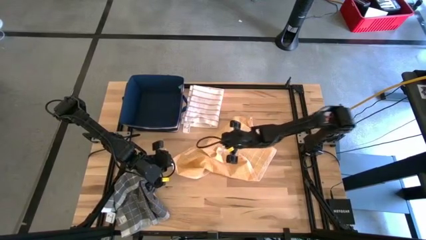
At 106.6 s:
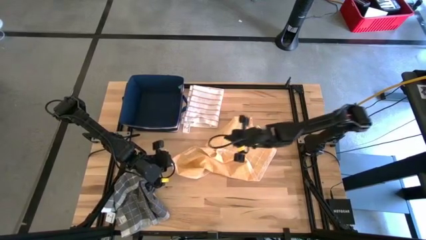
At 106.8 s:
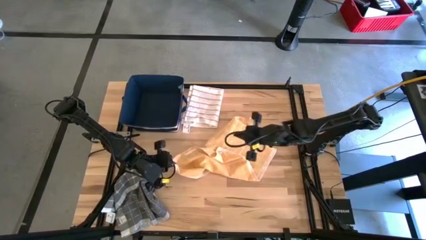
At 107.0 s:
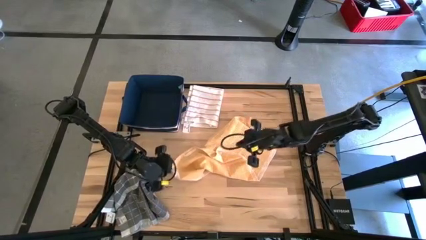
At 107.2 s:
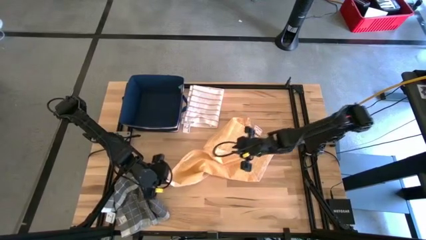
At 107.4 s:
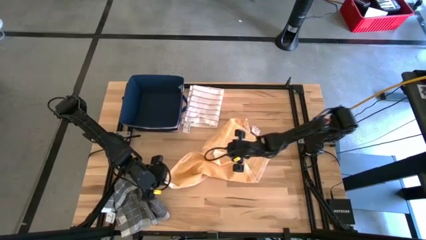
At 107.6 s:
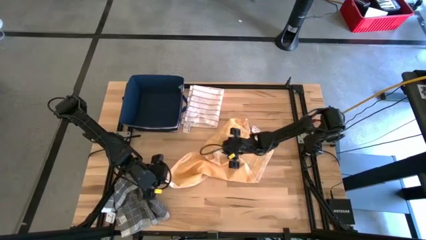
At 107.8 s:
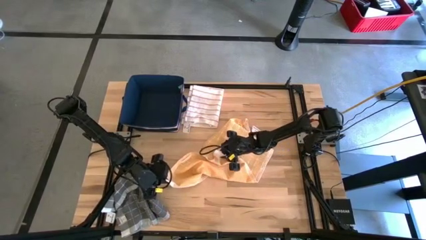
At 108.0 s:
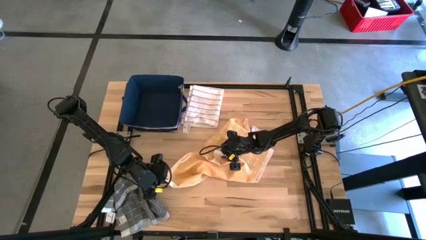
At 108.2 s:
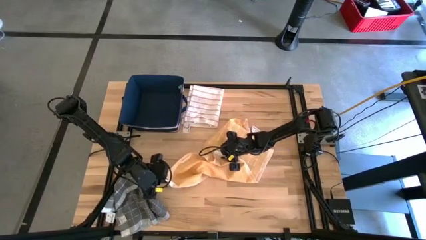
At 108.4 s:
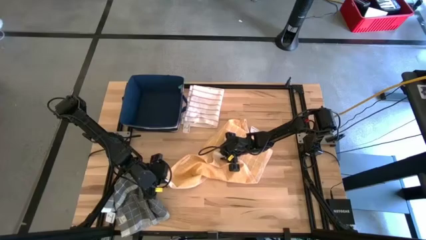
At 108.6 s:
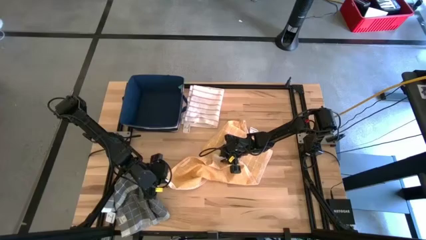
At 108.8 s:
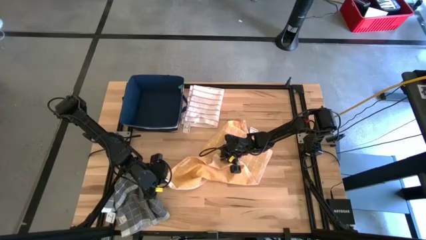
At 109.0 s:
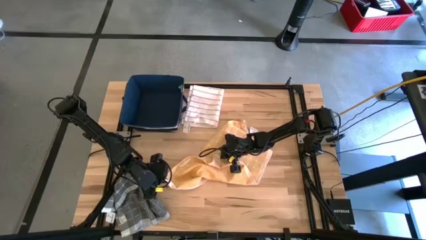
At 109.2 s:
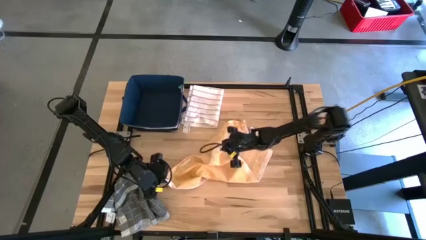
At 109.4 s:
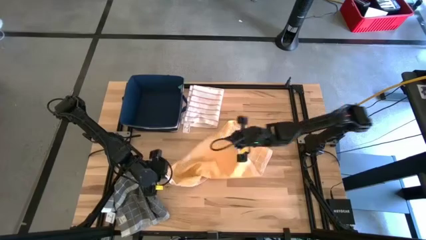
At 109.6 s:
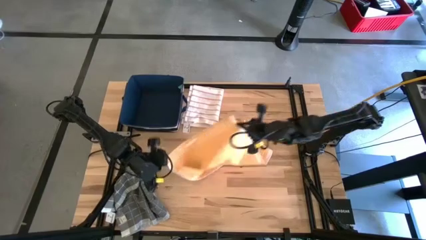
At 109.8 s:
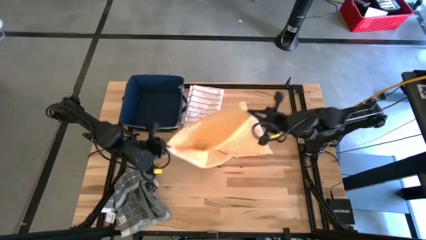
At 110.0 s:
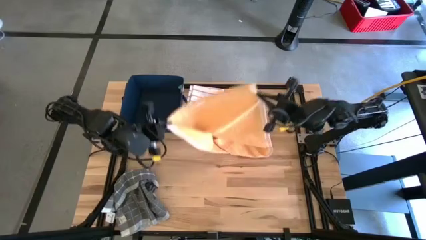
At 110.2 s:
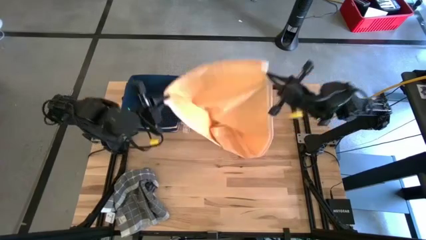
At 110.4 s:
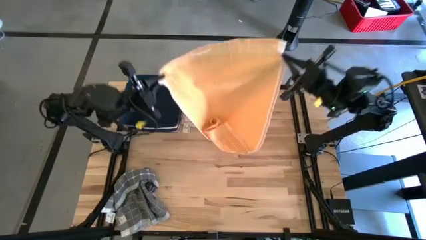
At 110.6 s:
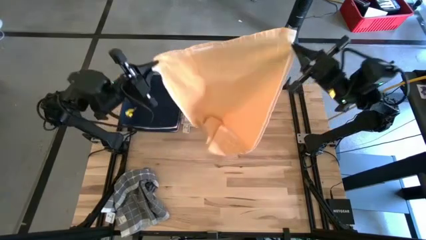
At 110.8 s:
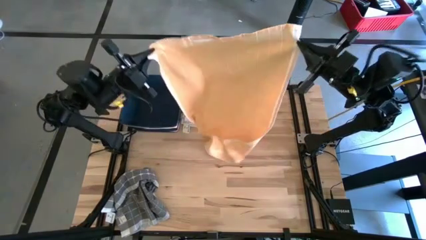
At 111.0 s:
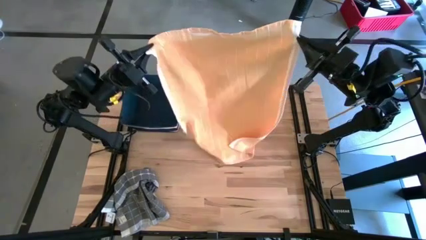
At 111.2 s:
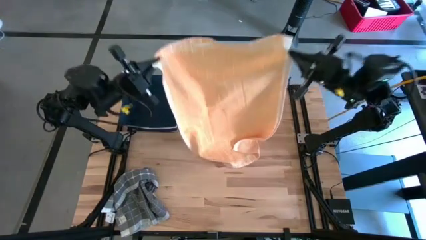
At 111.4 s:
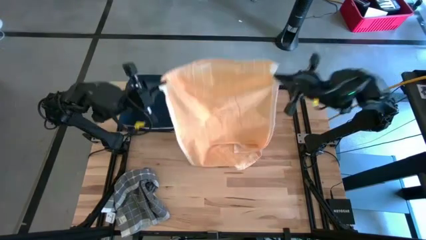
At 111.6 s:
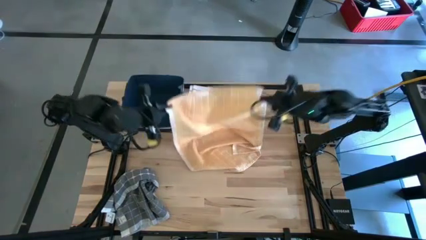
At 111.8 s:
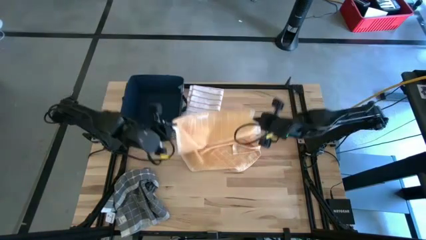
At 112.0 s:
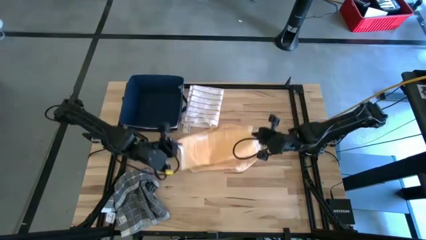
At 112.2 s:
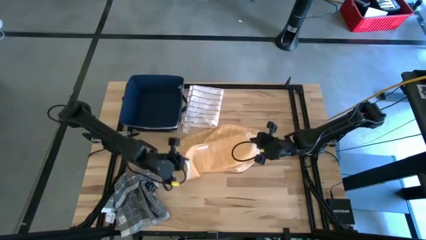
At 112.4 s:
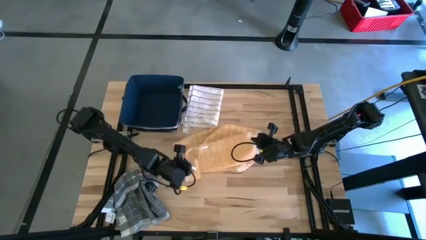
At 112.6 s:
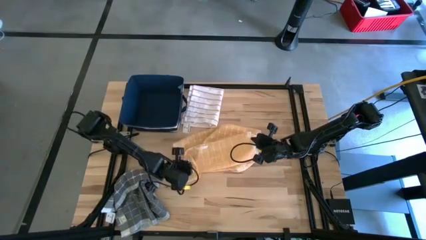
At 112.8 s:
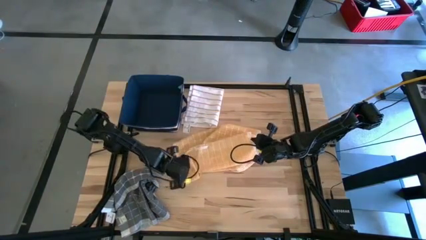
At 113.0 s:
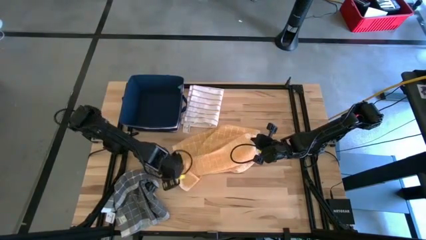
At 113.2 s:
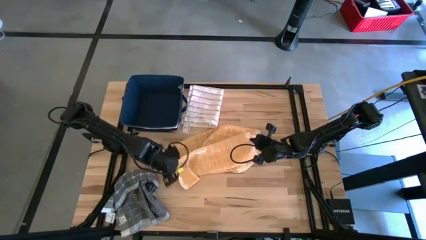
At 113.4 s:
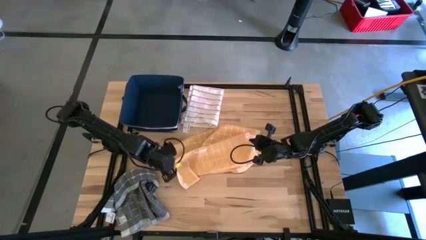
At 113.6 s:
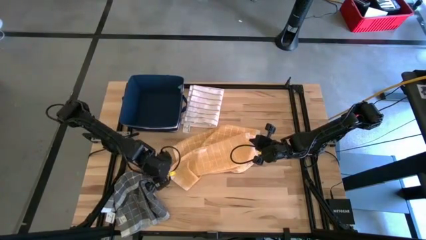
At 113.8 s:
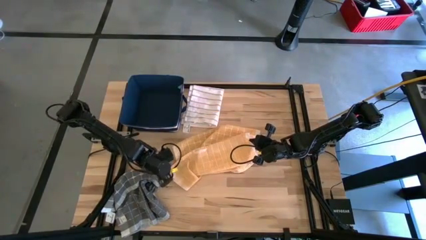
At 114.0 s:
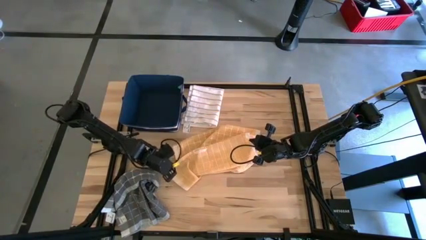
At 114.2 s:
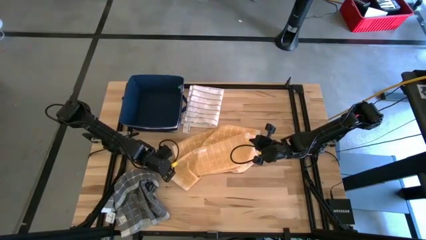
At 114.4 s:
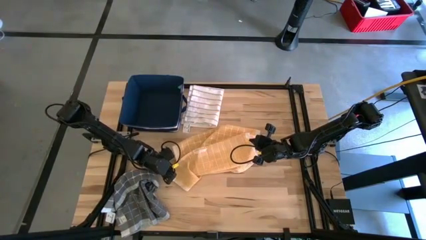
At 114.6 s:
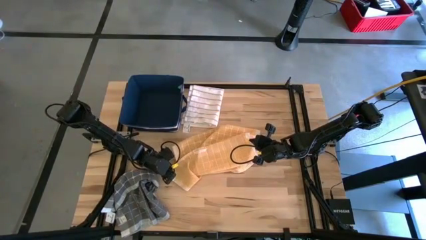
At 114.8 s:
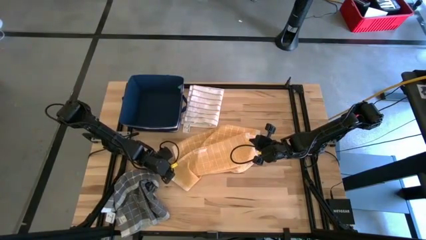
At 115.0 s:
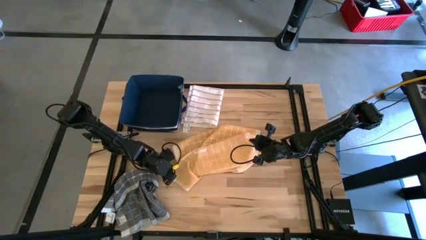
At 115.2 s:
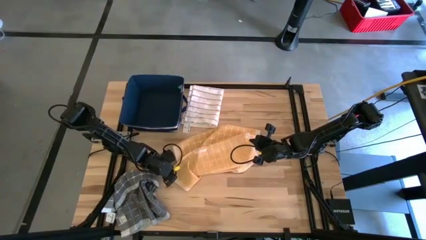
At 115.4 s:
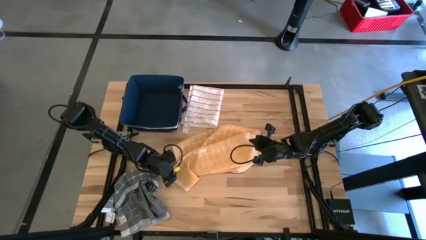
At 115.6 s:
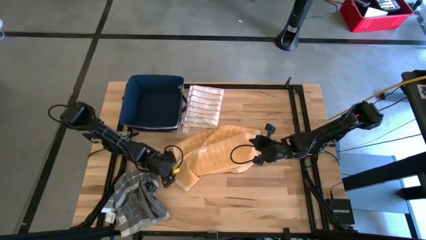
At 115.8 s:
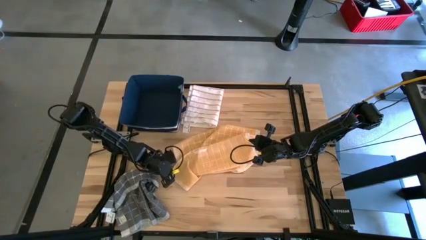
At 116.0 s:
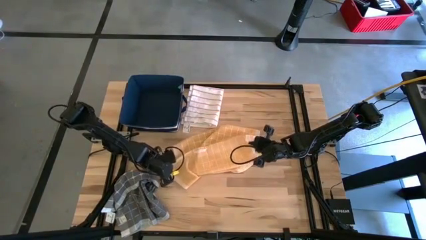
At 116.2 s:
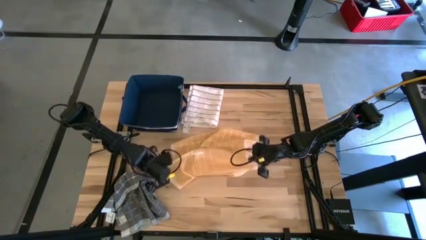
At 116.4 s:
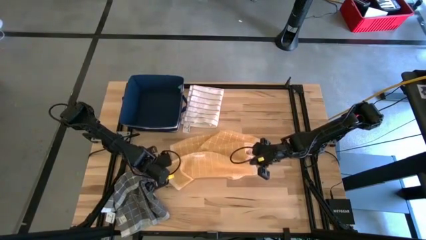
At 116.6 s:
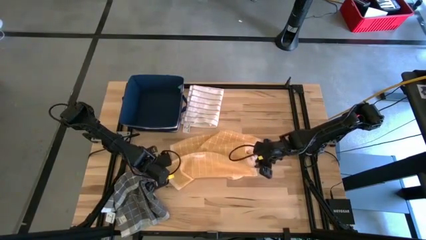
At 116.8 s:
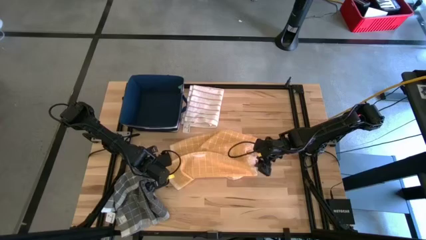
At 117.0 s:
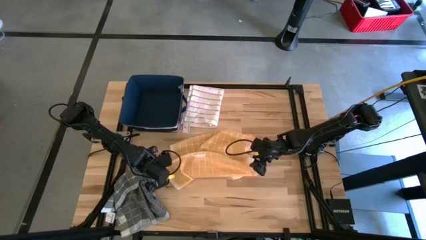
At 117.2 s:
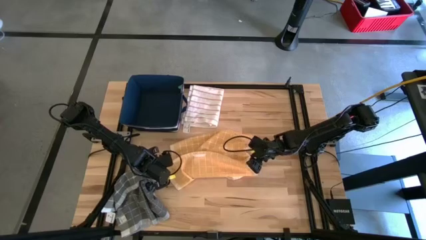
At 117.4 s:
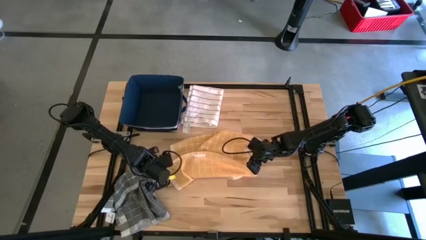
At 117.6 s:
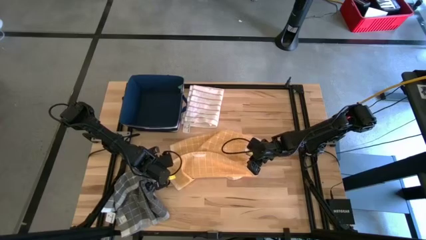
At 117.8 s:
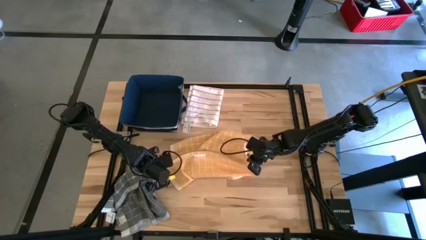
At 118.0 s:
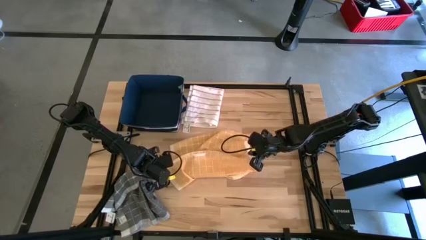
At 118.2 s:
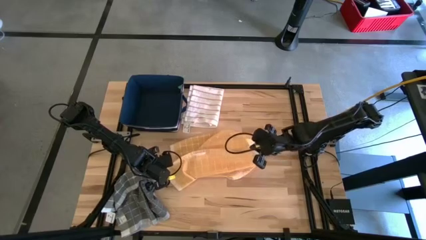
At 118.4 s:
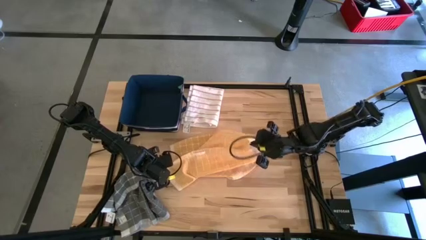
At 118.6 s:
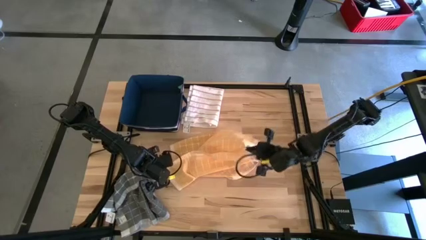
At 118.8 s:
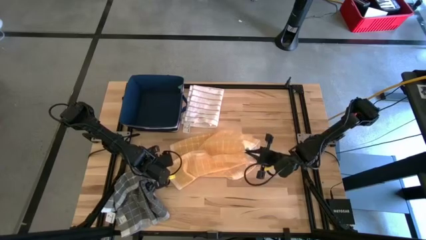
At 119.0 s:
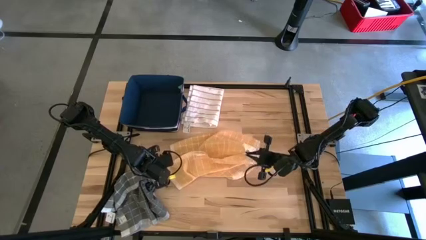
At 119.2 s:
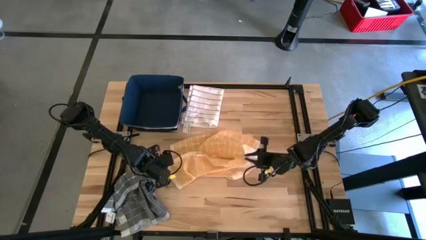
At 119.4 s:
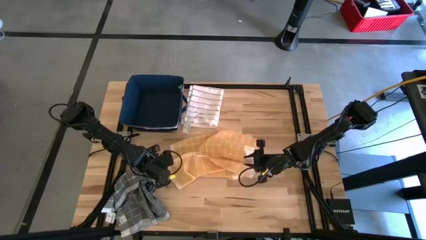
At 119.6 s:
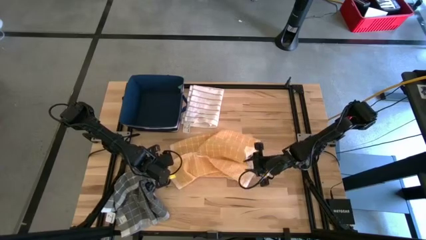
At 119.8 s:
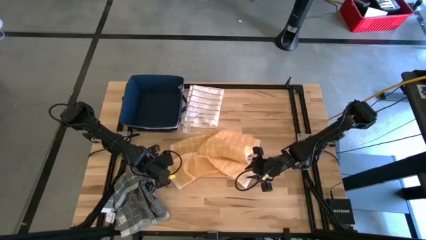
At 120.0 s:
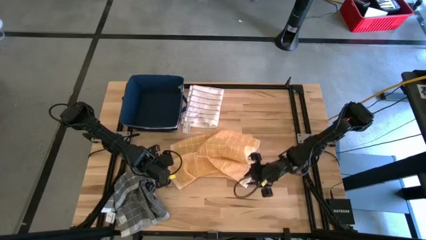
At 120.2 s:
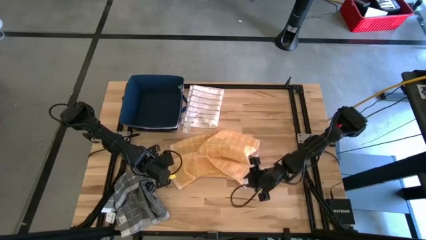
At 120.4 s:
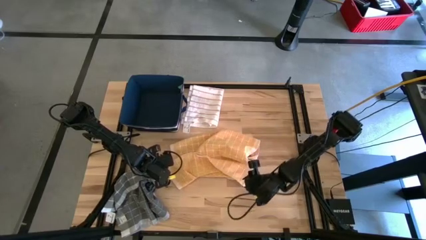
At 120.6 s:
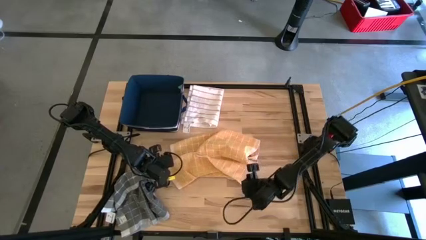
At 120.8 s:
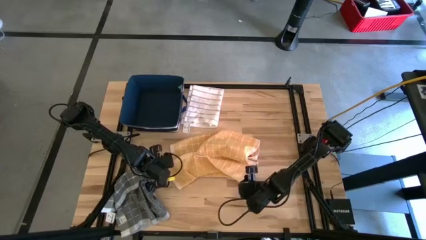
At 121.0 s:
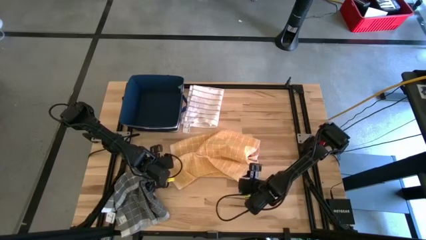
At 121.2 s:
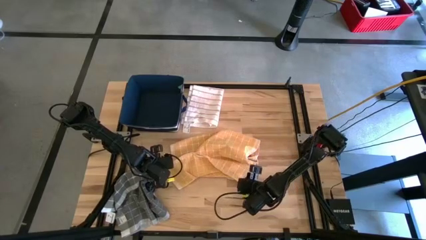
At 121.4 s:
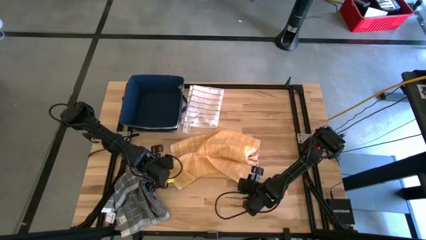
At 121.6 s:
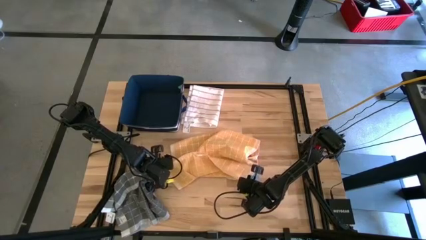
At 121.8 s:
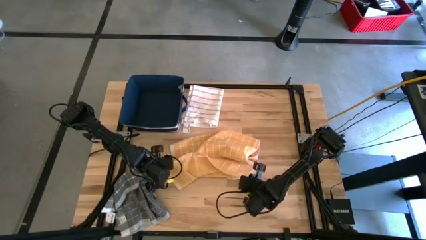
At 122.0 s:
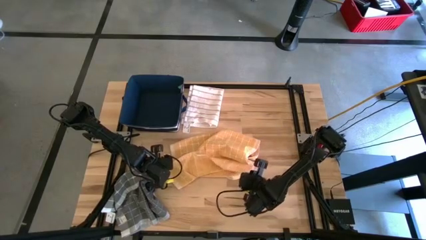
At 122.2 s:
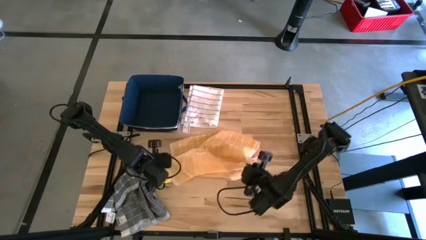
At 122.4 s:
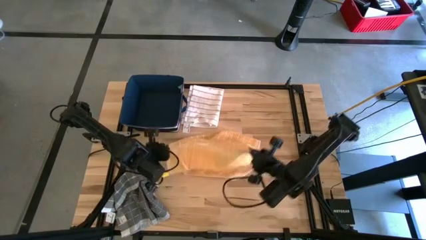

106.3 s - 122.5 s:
Task: Fold towel
Fold the orange towel

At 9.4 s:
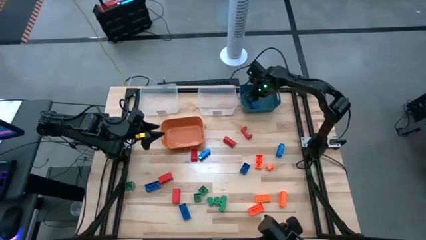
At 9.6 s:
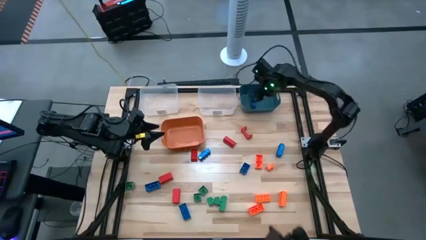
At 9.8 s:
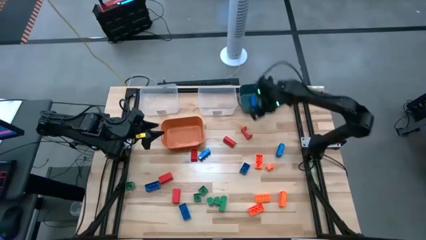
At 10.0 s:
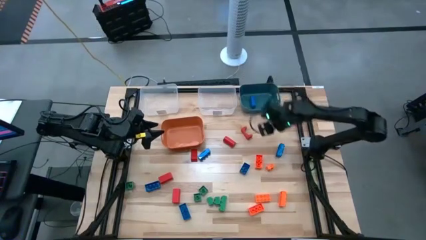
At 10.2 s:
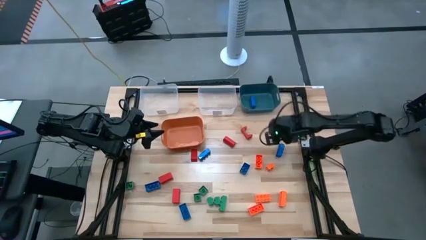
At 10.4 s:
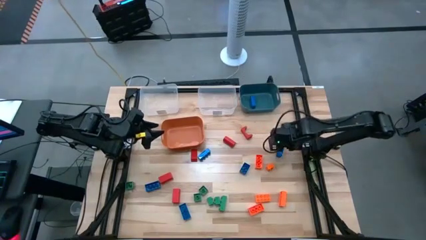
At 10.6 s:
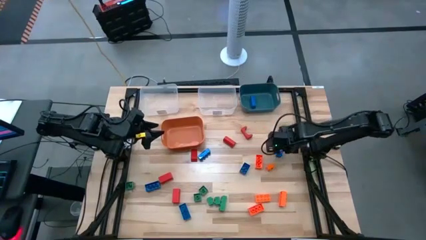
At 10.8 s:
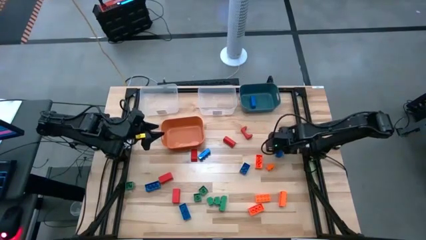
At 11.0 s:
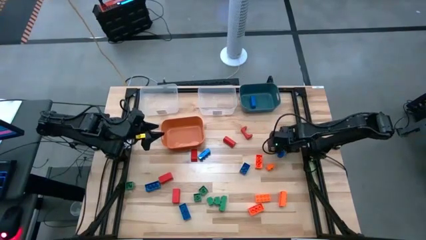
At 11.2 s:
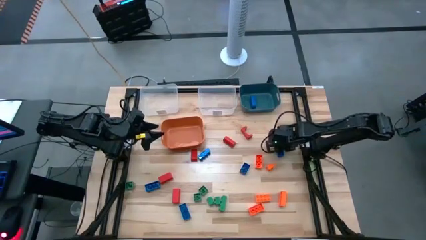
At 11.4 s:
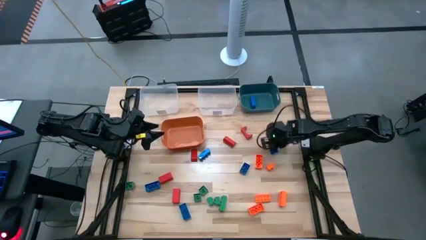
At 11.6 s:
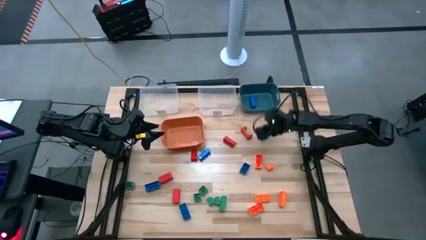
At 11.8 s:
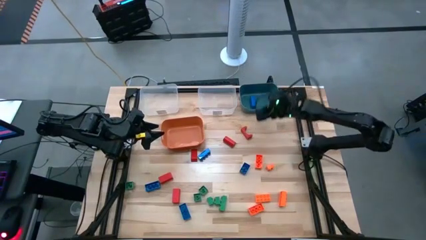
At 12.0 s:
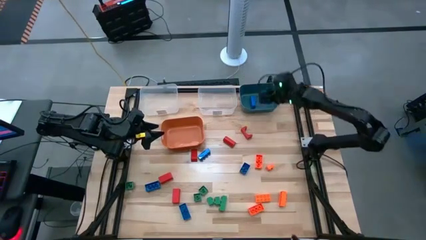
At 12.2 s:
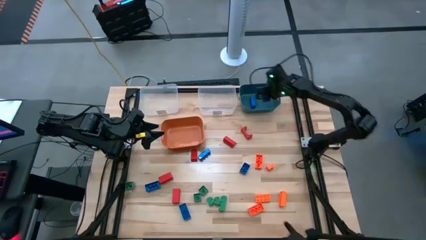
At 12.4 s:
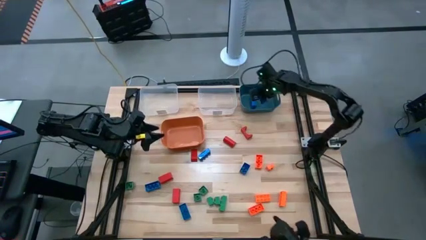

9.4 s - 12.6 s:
Task: Sort blocks
Put the blue game piece into the blue bin
